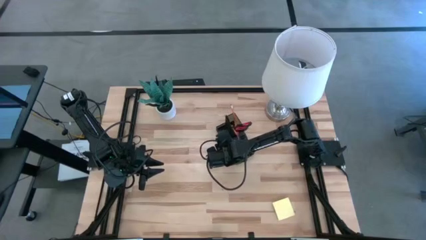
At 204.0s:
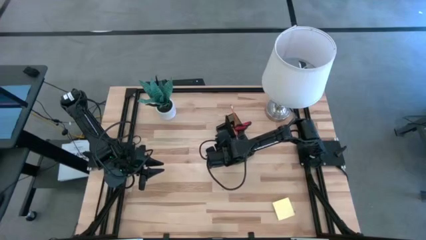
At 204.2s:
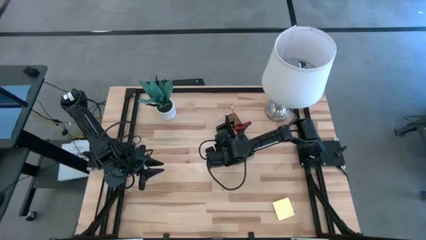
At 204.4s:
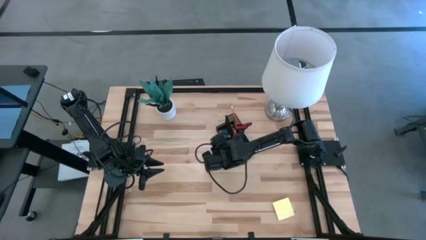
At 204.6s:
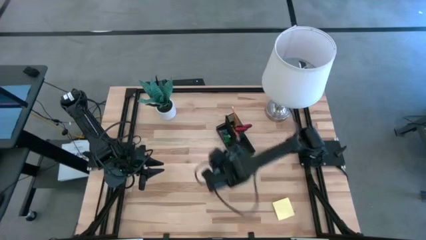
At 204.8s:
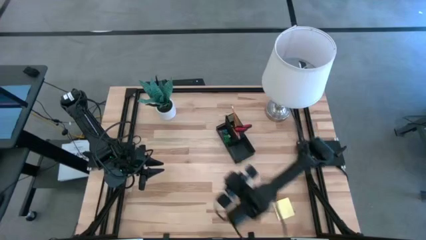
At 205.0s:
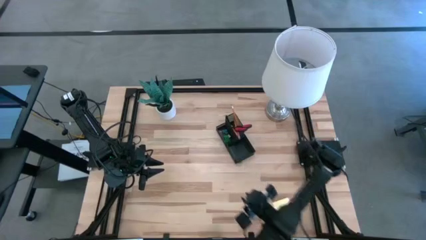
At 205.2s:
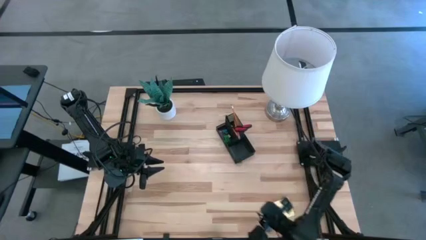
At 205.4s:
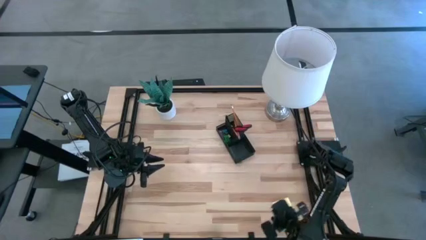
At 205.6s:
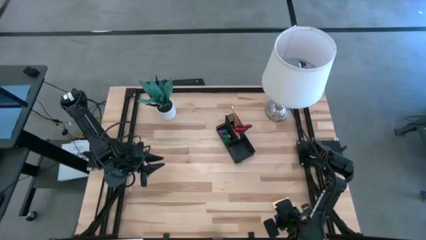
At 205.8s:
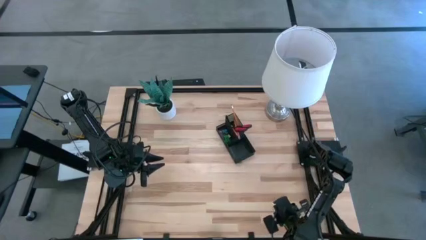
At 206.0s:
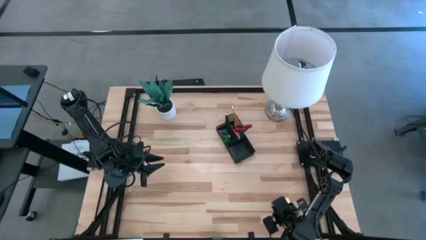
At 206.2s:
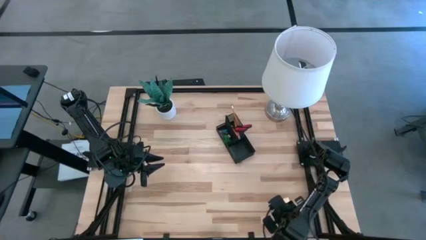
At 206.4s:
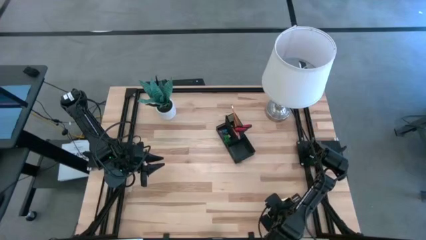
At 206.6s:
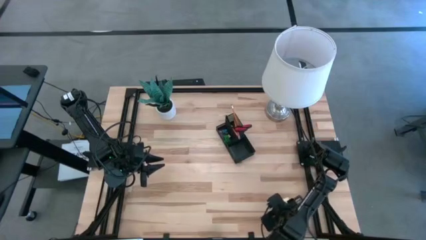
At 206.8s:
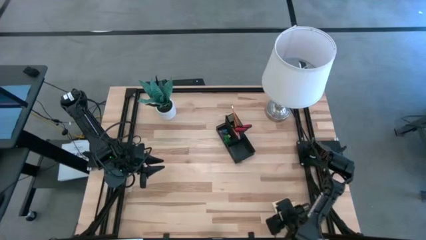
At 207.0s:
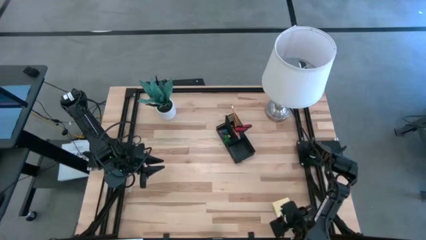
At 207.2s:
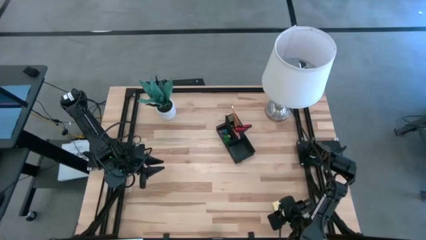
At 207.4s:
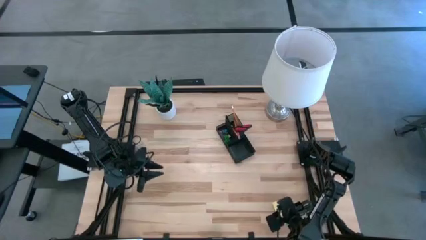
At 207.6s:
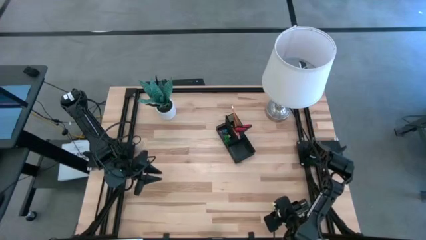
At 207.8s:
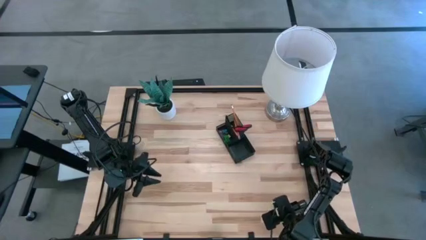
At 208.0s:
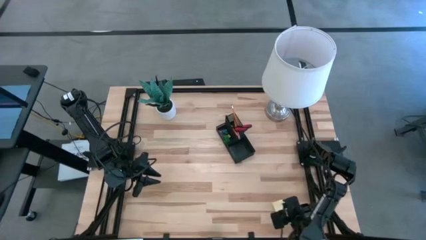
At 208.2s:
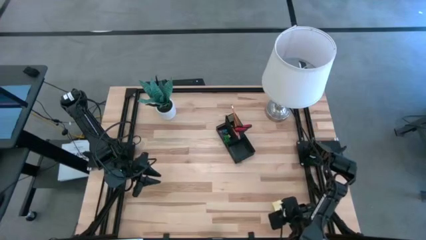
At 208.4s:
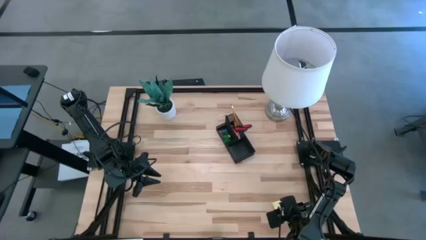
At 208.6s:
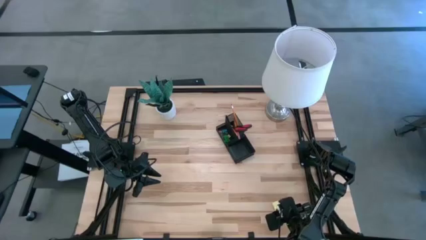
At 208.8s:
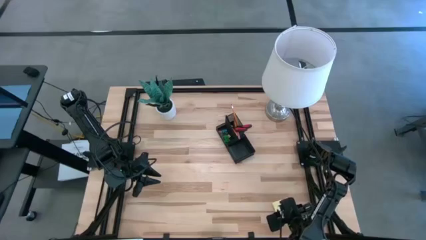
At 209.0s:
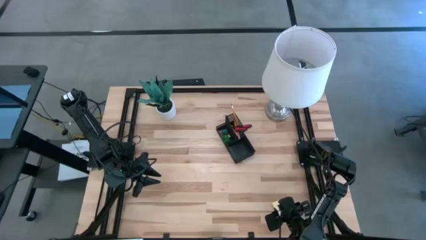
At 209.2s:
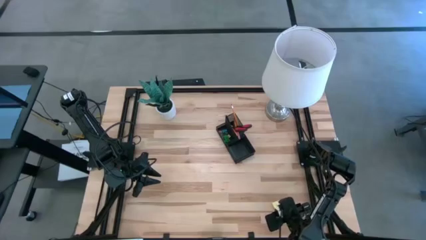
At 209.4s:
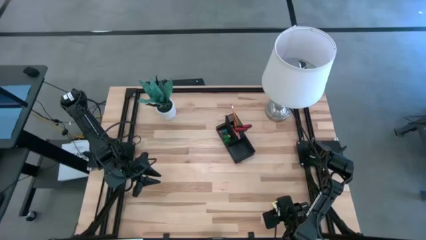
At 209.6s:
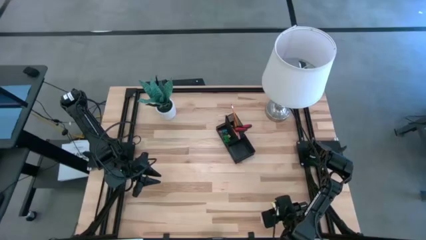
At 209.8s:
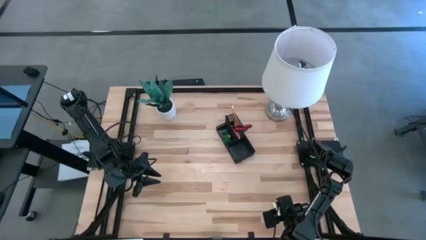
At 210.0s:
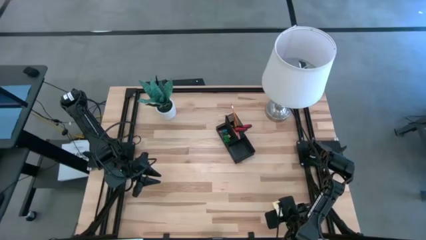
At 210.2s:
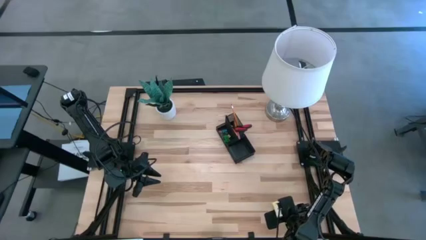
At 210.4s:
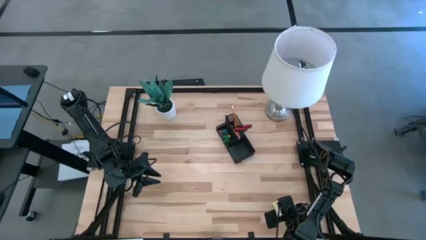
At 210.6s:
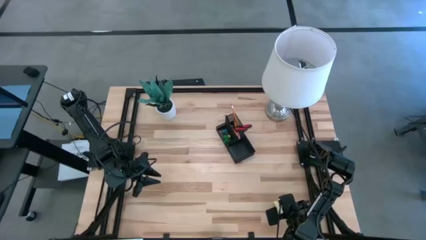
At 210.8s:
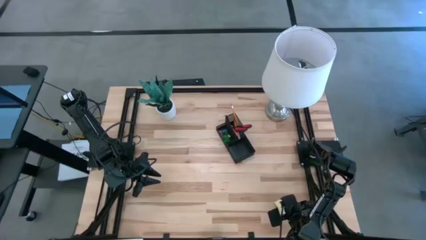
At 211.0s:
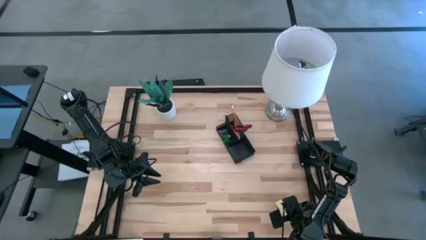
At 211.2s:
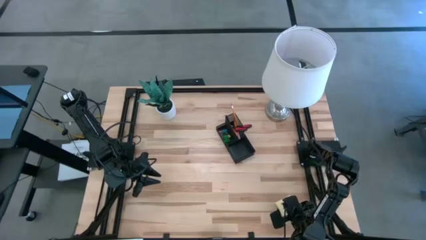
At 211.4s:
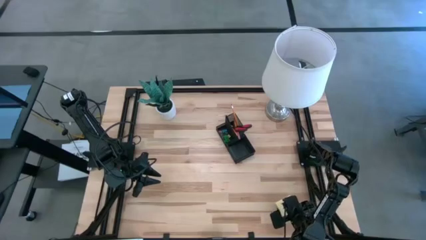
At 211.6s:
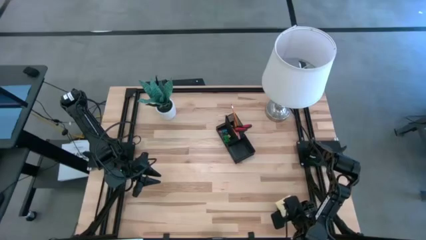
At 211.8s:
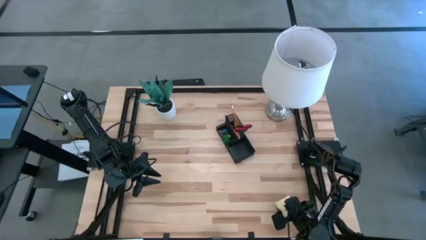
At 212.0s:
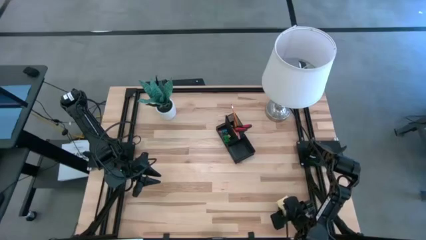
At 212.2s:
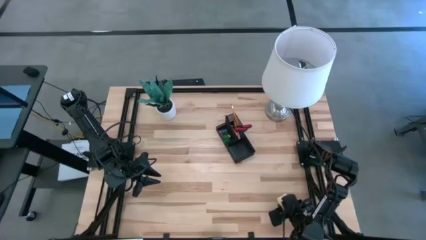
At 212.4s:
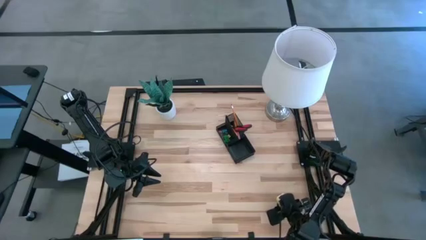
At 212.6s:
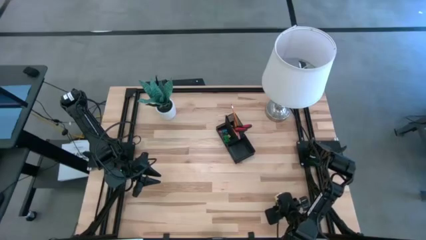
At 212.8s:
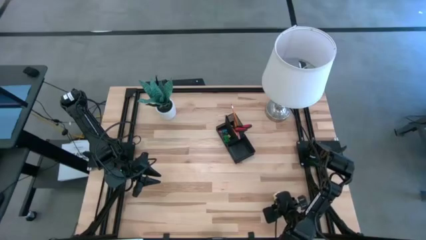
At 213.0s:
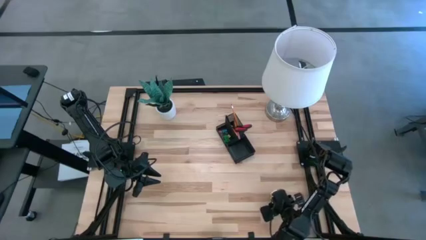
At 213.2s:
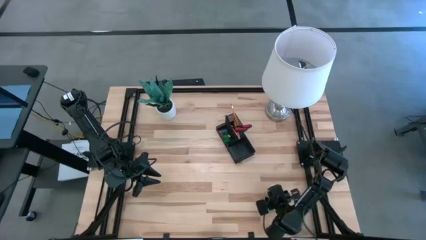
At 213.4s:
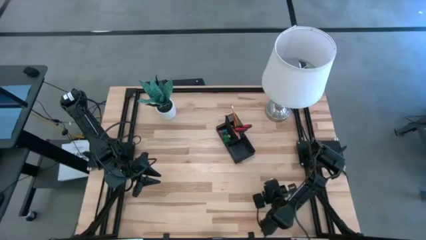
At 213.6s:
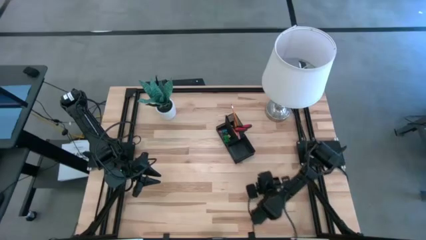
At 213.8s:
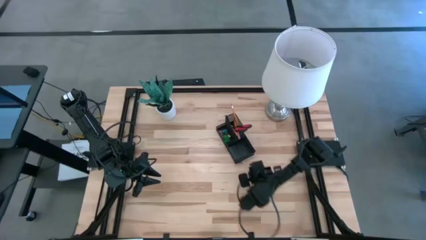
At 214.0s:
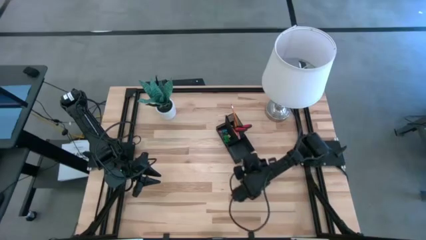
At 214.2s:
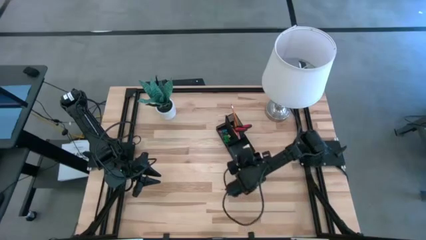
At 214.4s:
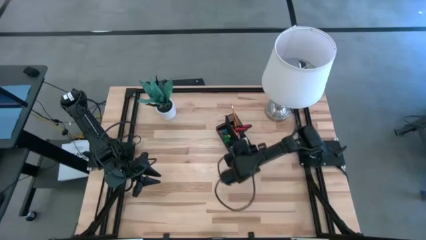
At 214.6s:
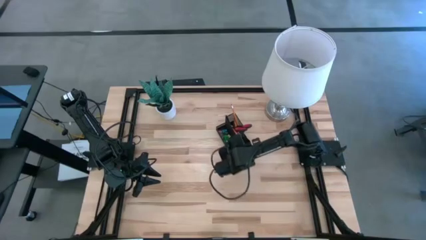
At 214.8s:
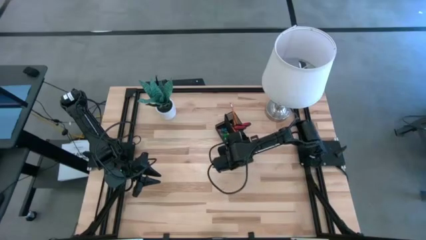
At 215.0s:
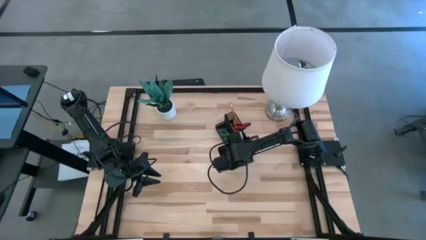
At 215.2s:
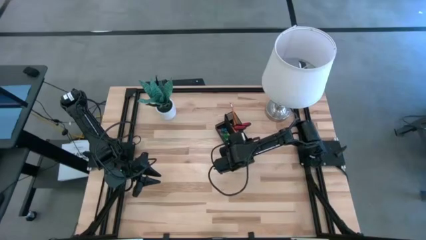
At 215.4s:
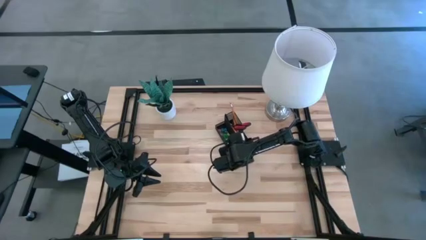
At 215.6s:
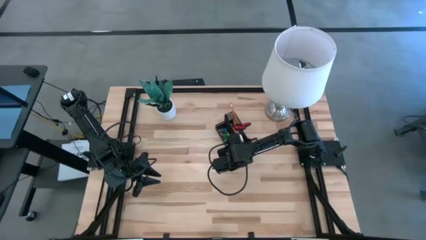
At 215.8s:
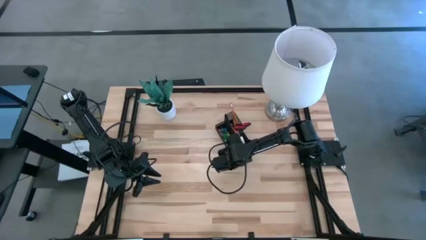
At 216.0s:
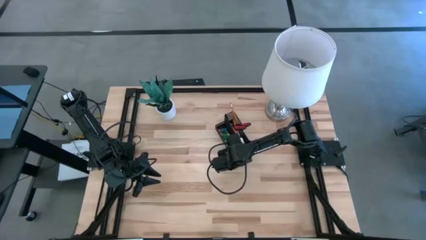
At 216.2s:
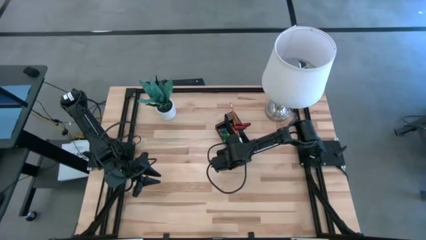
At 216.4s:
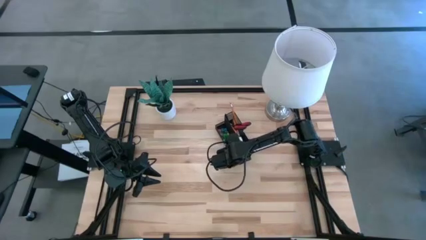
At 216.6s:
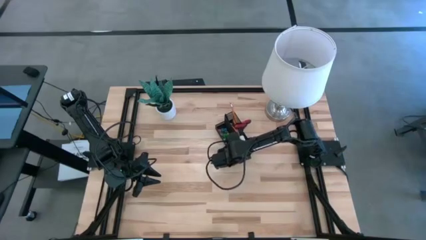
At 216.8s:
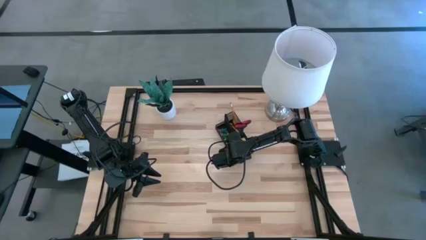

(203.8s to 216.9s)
Task: Pick and place office supplies into organizer
Put the yellow sticky notes into the black desk organizer

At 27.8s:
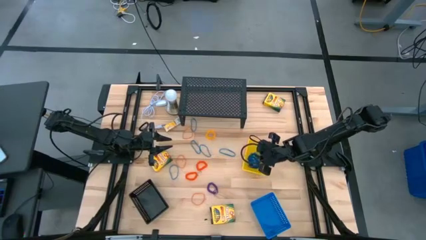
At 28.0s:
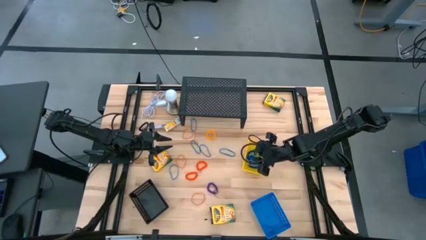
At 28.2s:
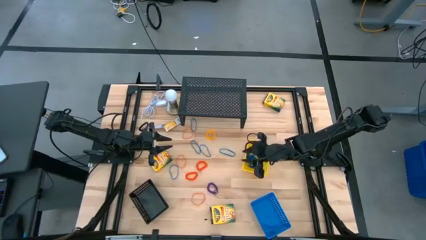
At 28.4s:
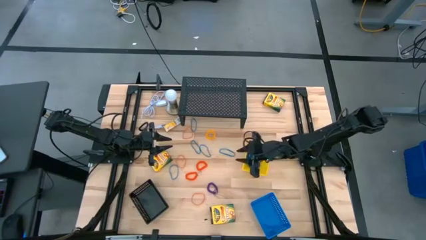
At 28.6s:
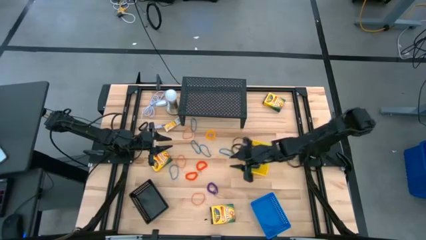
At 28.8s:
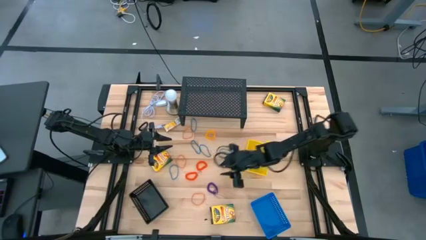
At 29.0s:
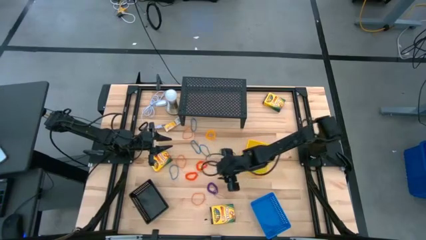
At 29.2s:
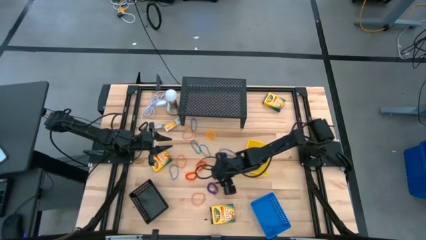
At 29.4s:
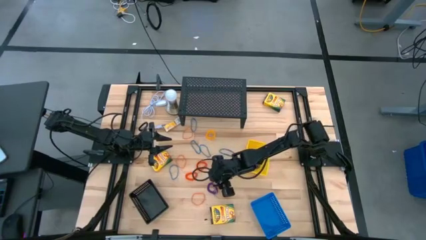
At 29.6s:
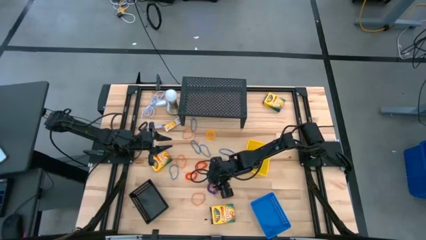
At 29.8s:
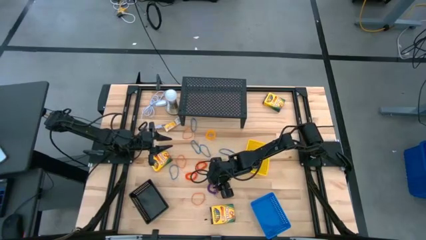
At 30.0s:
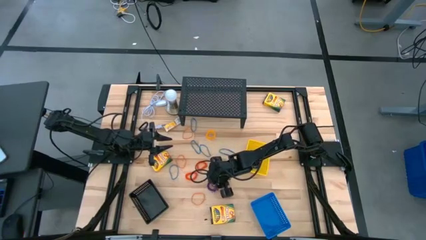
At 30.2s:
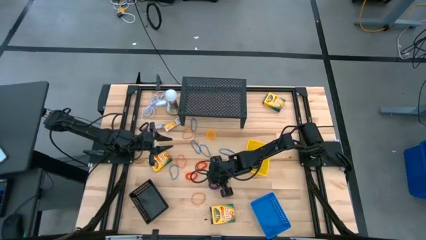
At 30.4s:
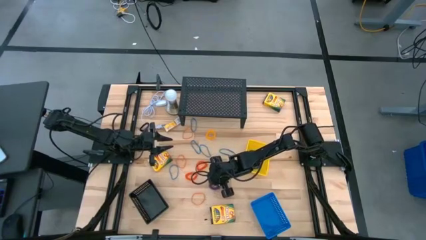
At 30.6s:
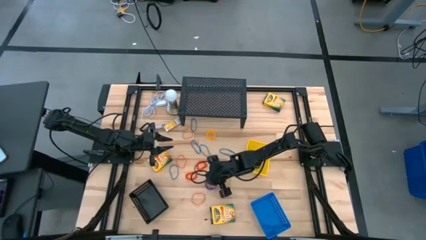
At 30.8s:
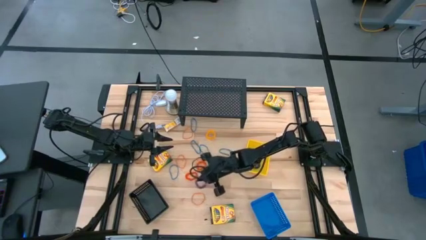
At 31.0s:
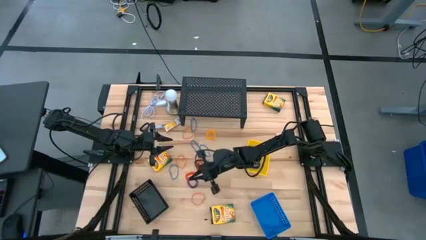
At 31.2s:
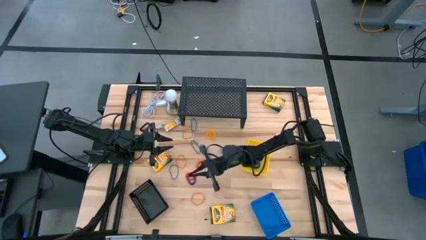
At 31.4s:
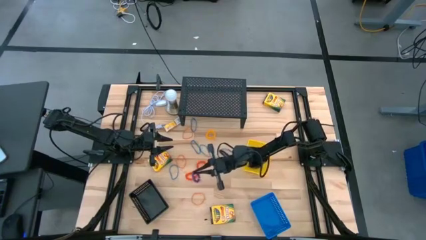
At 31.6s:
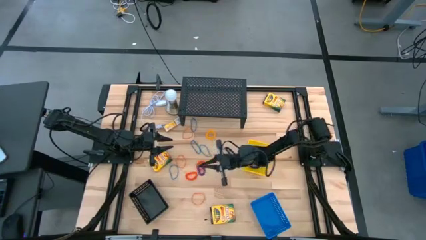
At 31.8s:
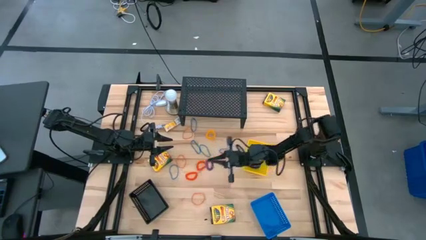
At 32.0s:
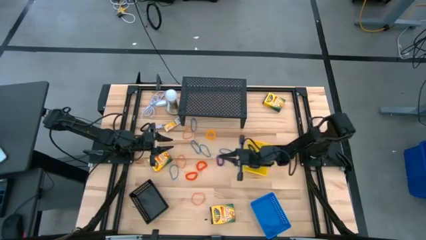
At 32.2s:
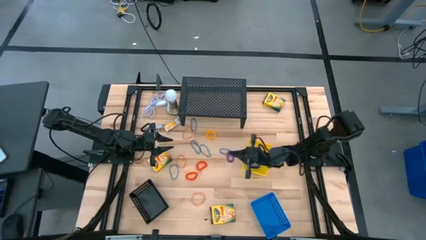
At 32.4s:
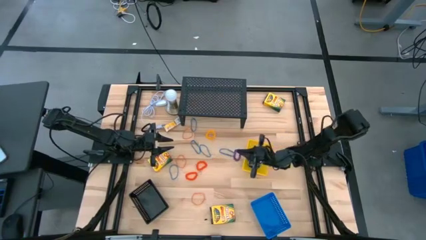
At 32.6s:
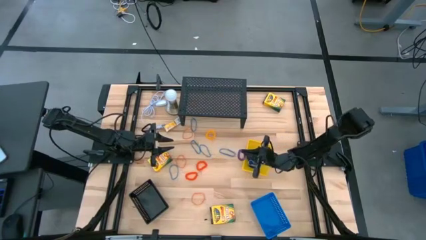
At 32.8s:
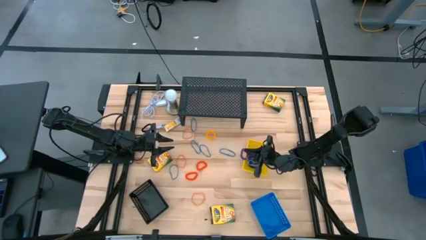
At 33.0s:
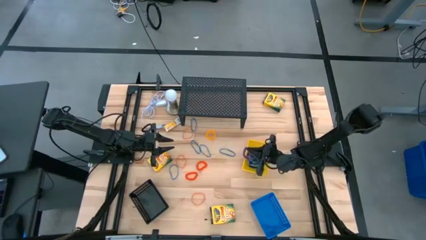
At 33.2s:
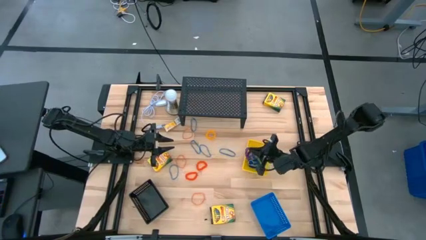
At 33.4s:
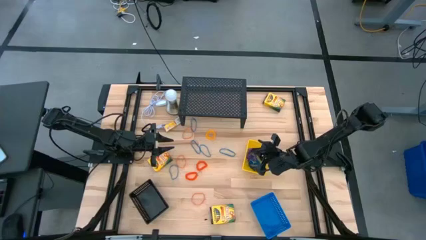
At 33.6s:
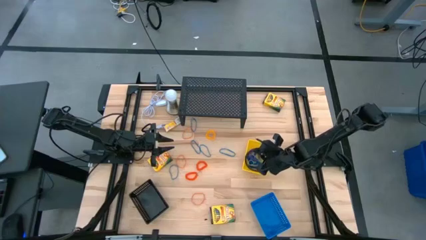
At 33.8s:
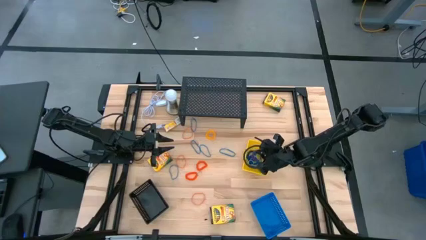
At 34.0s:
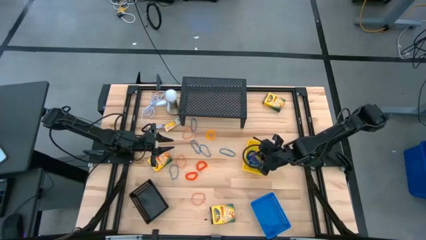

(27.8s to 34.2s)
Task: Pick & Place Office Desk Supplies
Put the purple spring keychain into the yellow basket
